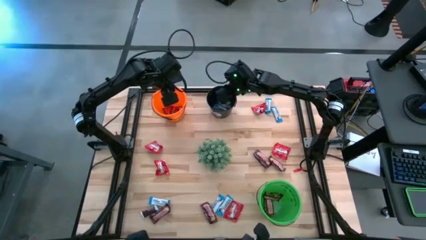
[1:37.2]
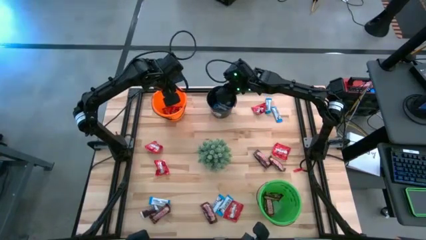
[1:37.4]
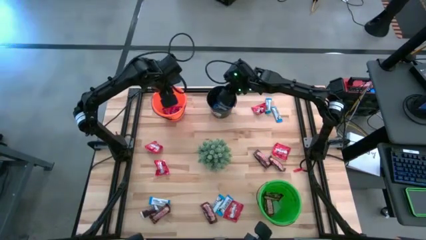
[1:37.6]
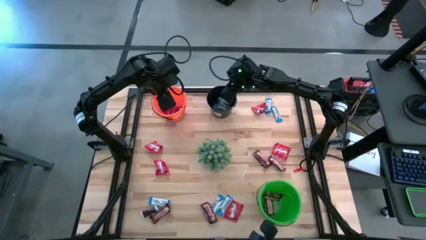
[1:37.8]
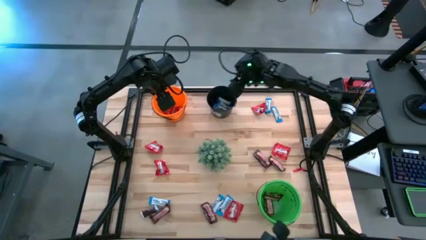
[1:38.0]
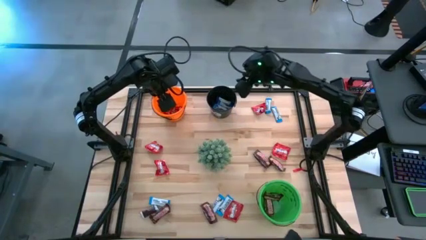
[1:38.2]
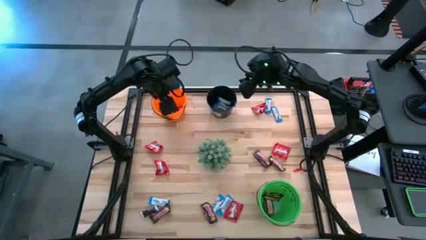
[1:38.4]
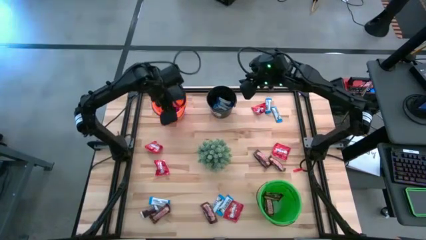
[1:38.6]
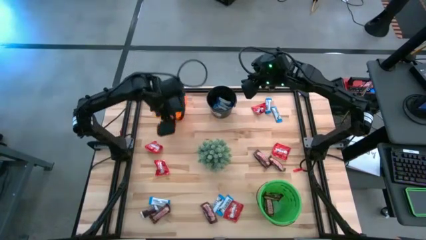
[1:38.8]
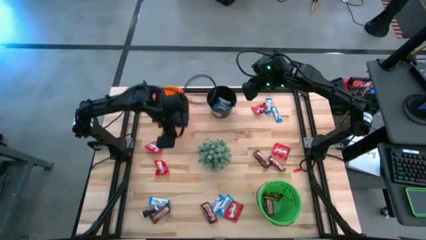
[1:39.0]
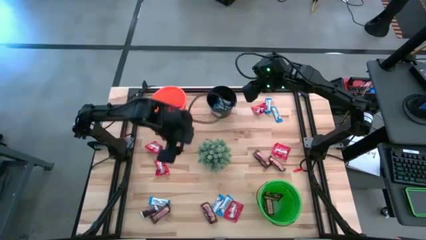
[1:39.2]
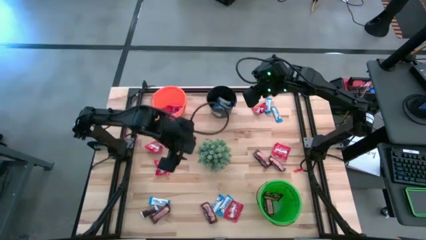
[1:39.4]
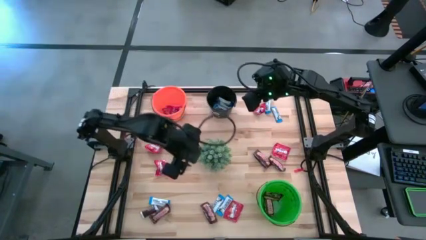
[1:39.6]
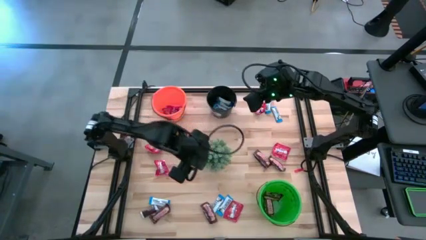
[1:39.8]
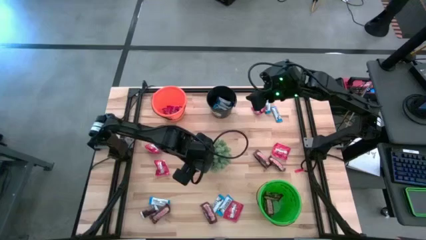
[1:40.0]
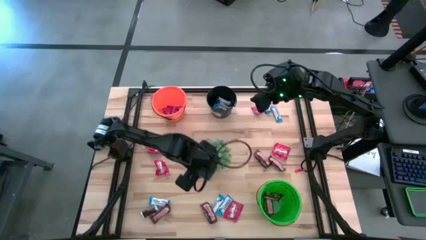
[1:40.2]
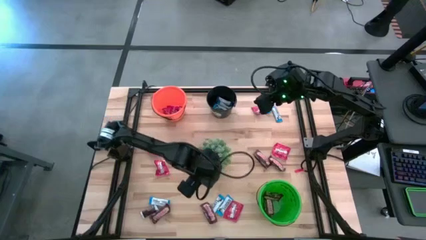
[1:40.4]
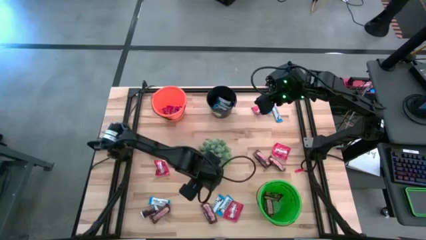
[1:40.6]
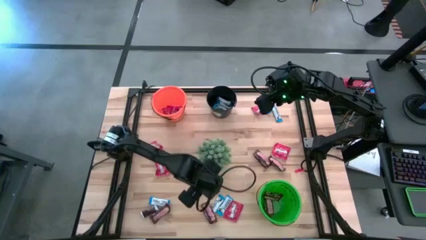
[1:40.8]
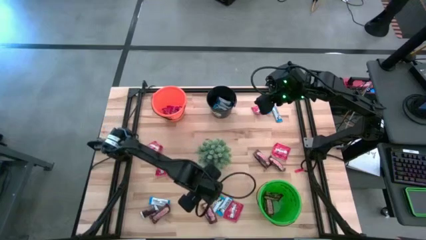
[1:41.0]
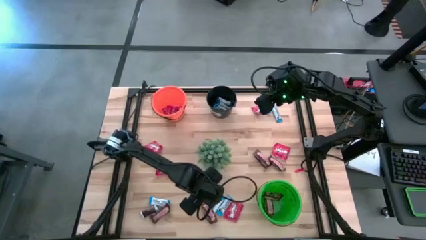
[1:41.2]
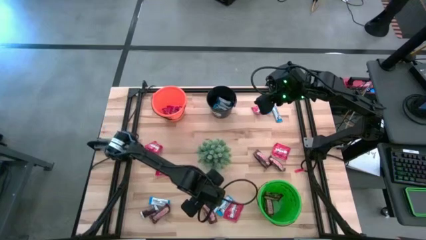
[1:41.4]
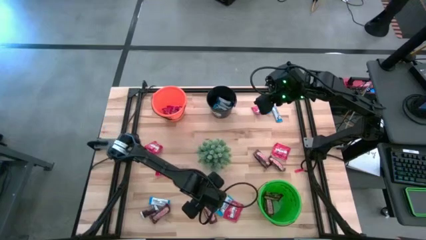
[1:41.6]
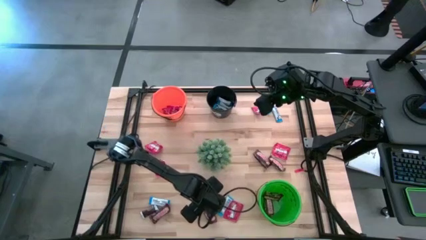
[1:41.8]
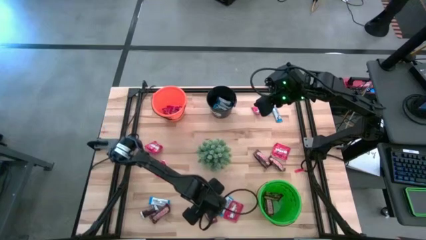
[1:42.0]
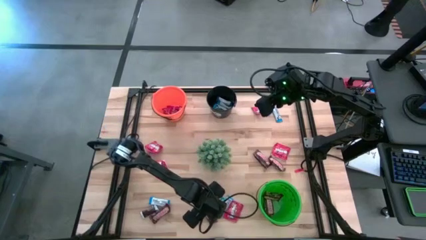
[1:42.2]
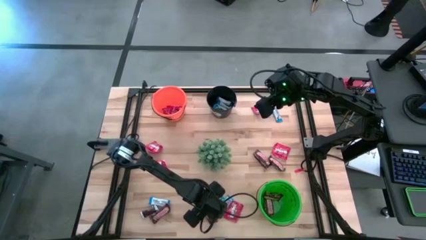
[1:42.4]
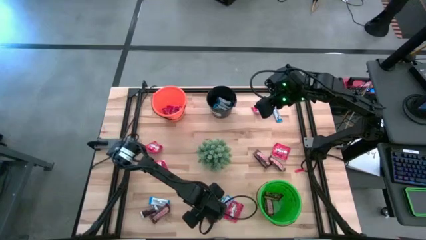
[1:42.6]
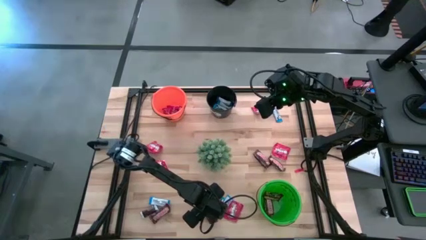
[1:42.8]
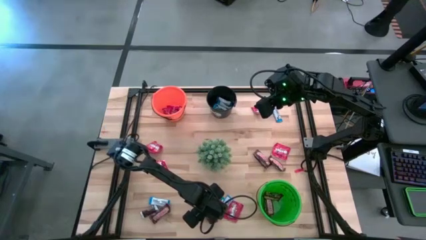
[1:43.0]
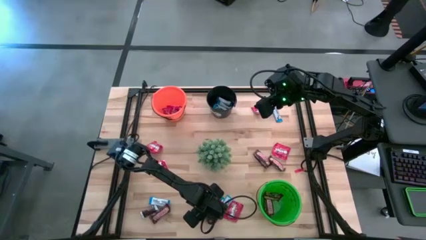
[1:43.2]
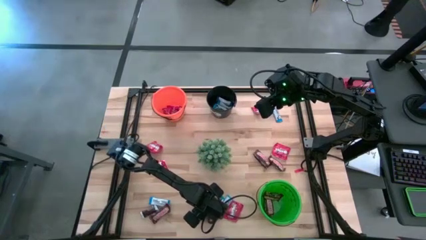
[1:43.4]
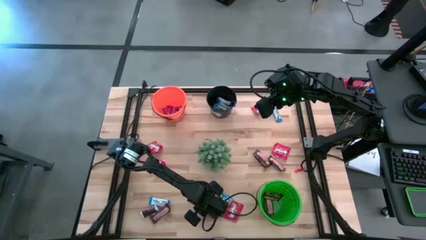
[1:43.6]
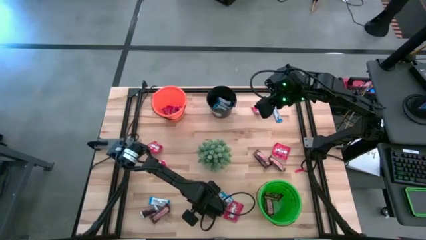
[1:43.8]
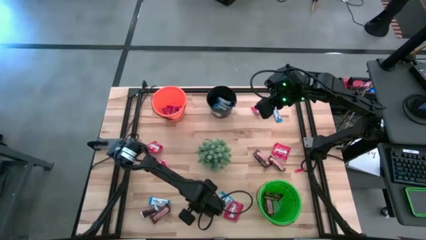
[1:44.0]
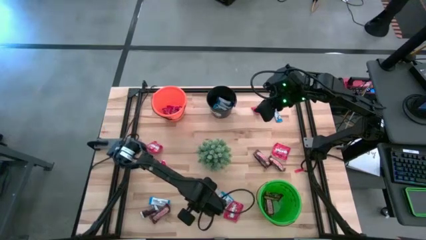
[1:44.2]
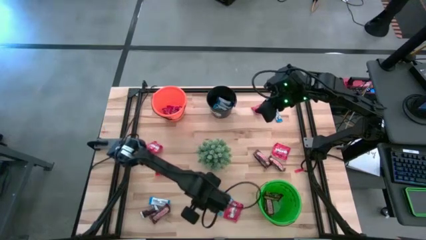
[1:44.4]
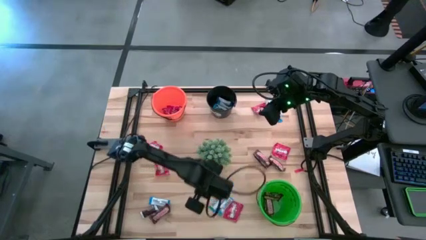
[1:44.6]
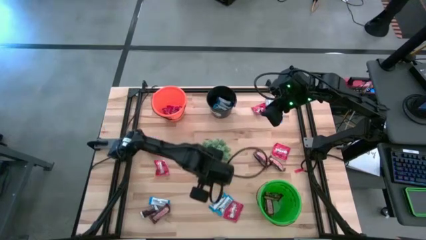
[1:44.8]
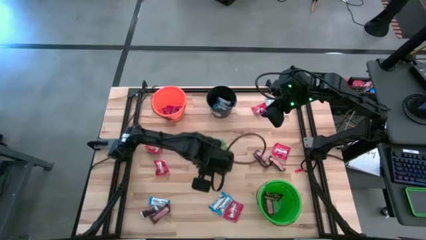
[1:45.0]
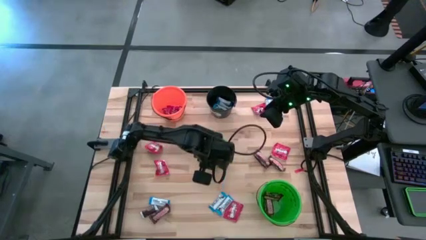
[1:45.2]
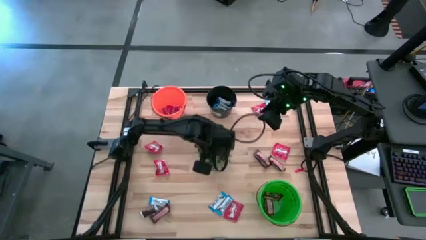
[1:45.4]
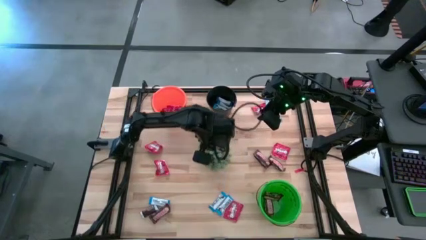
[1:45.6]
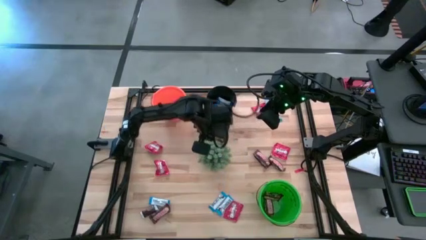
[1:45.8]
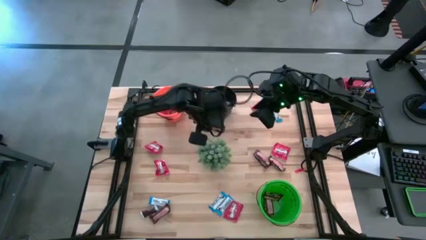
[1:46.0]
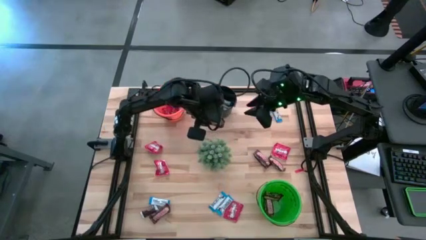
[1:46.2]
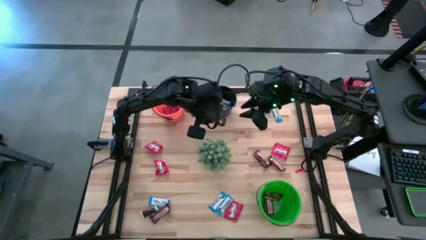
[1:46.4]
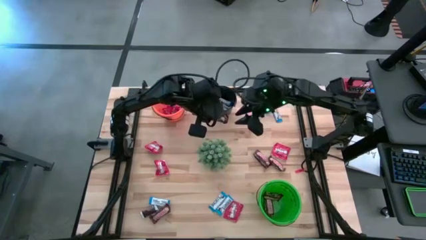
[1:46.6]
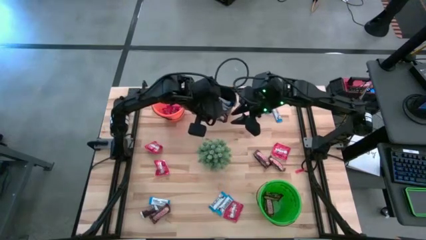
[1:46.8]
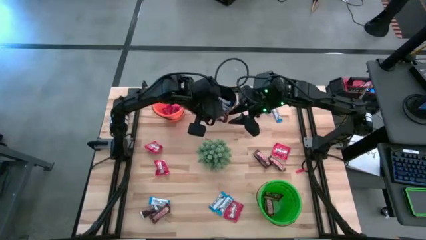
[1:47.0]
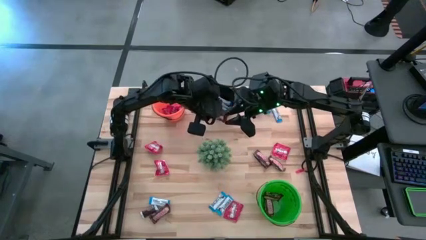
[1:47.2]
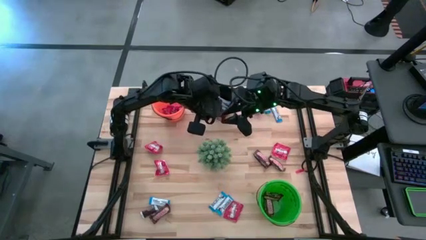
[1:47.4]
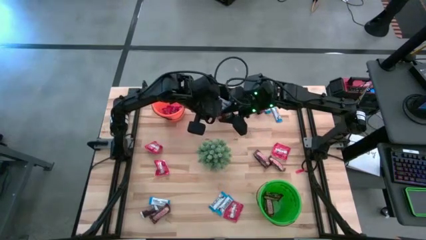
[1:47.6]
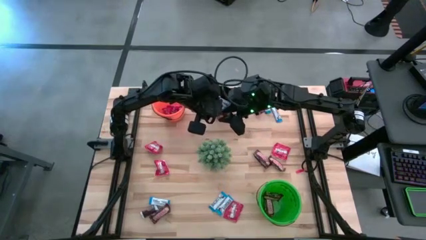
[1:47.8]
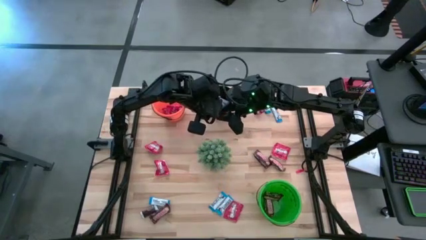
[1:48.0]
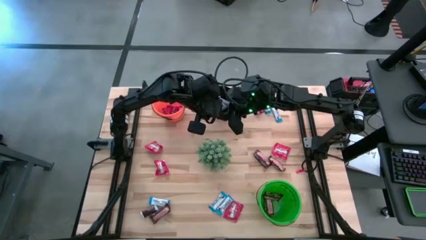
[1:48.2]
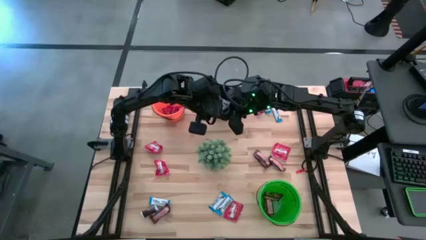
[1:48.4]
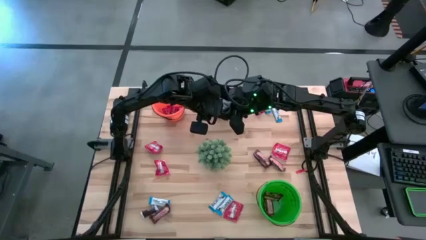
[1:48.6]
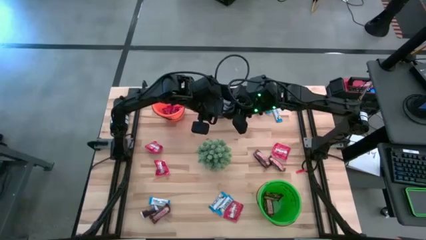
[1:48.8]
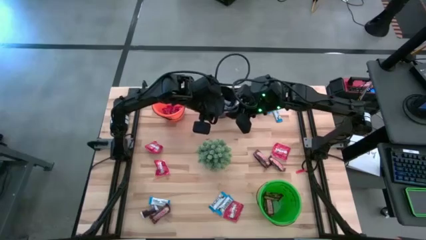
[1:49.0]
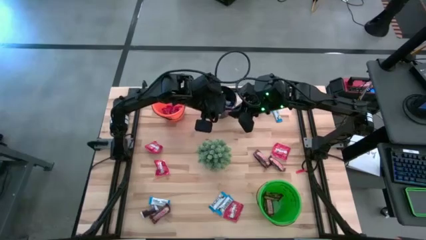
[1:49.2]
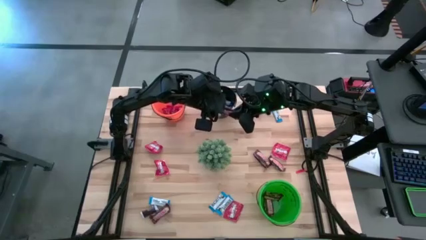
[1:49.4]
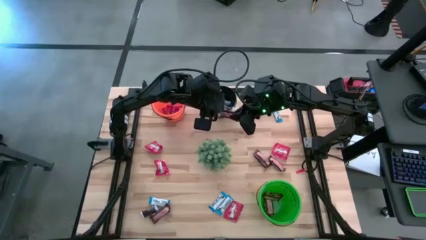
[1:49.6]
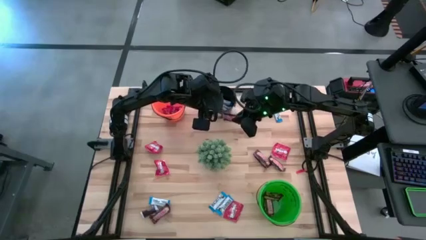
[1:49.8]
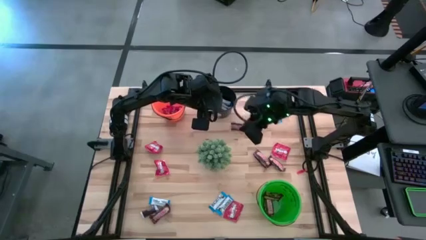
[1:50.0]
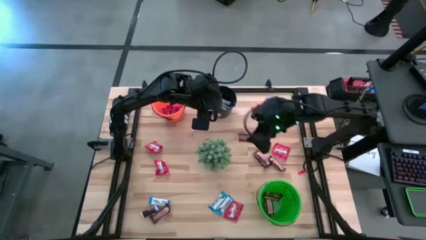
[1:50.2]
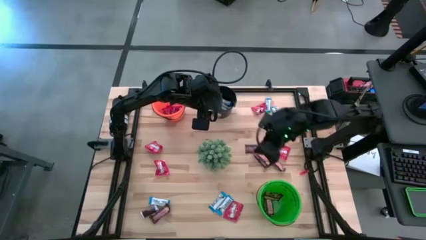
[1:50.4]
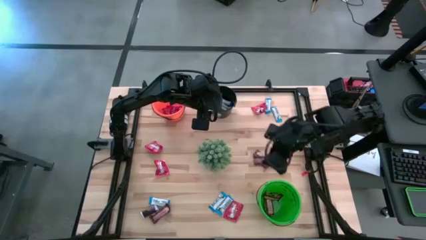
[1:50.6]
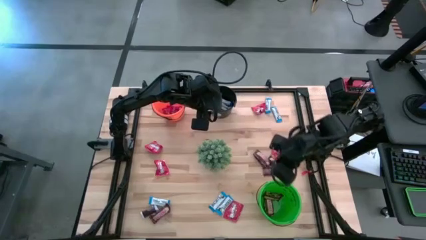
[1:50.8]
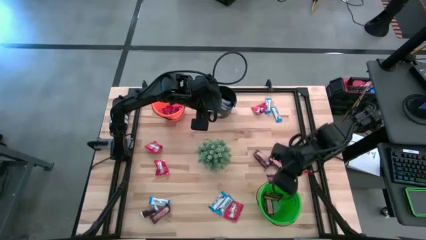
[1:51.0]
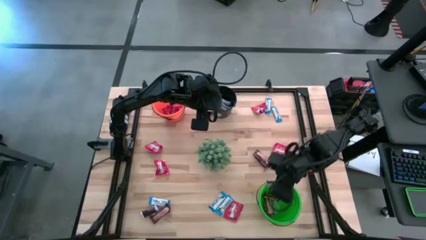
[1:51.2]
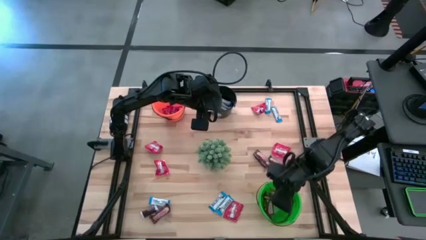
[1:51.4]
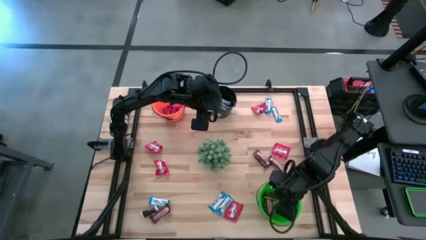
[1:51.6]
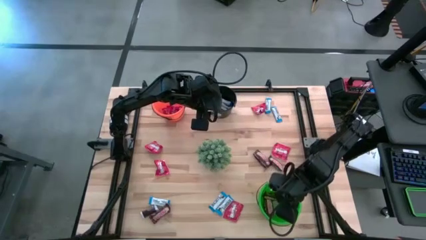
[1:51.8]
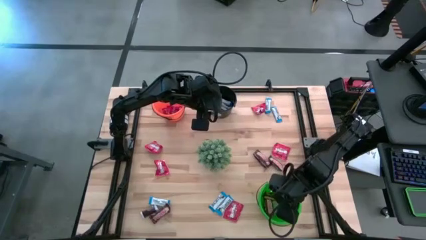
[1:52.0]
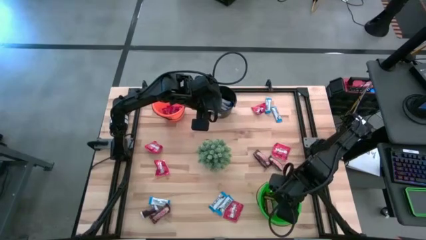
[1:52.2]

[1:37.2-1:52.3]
Task: Organize candy in baskets
Put the brown chocolate bar into the green bucket
